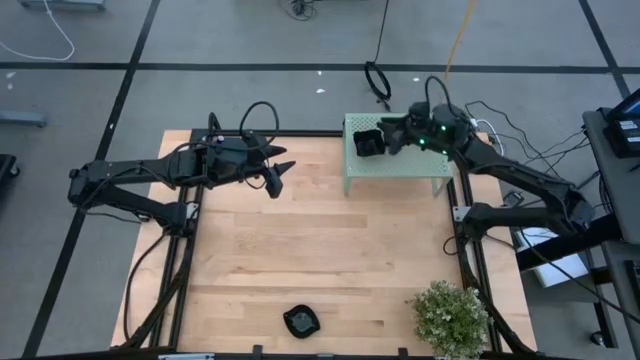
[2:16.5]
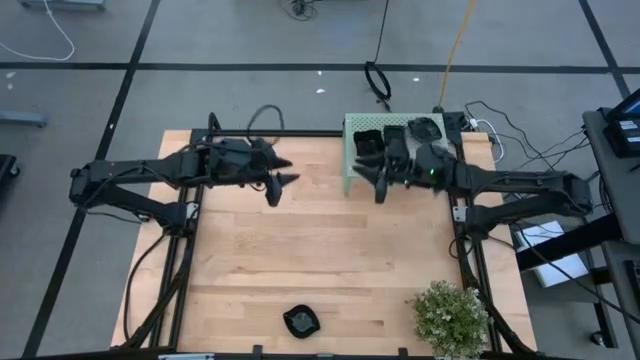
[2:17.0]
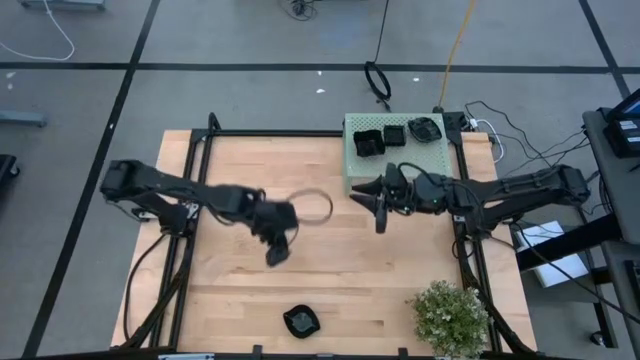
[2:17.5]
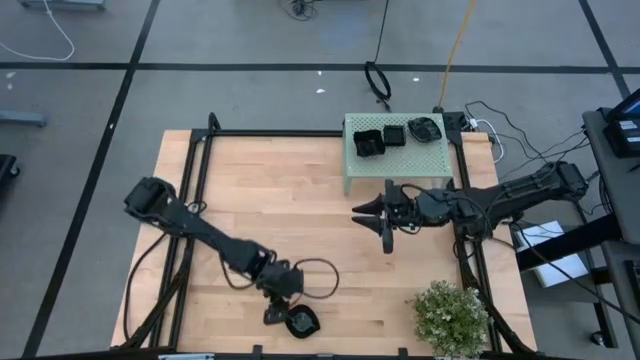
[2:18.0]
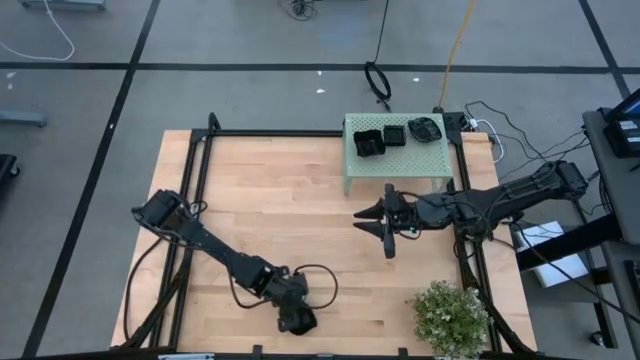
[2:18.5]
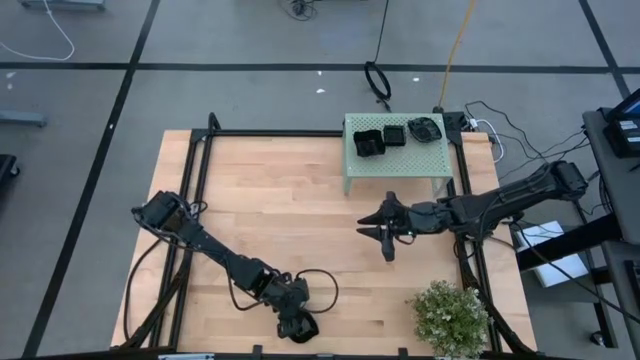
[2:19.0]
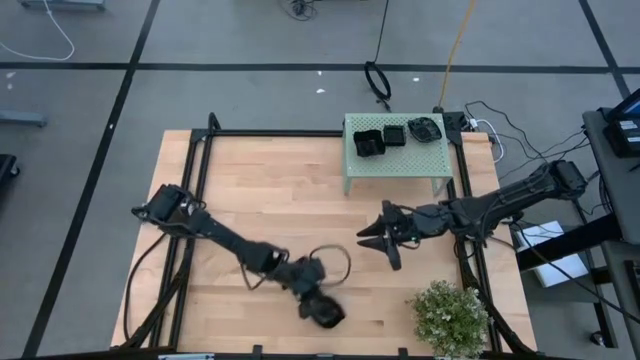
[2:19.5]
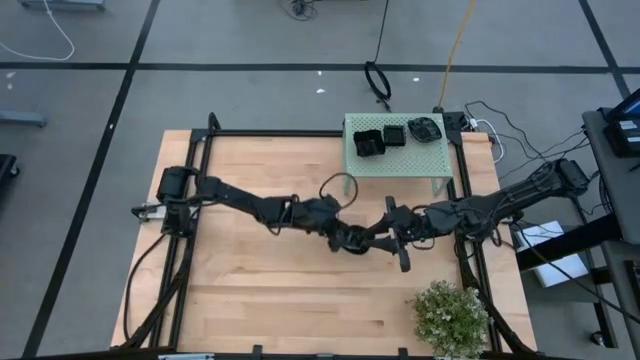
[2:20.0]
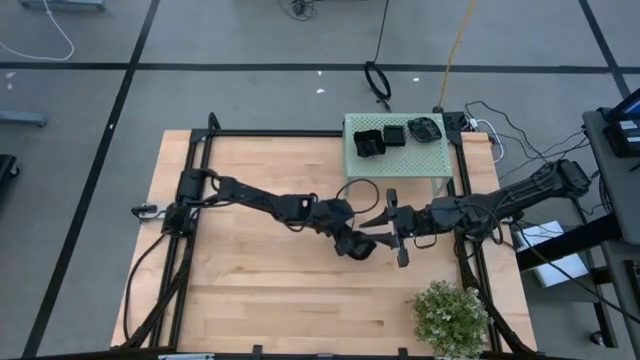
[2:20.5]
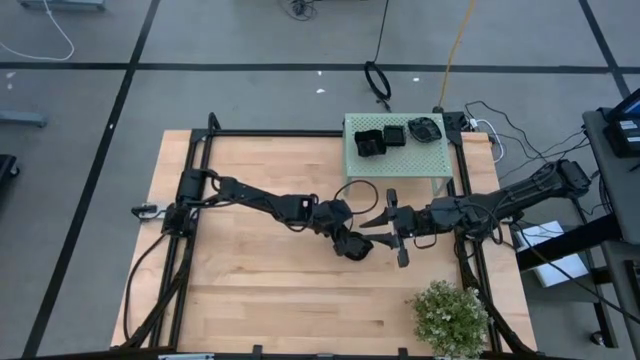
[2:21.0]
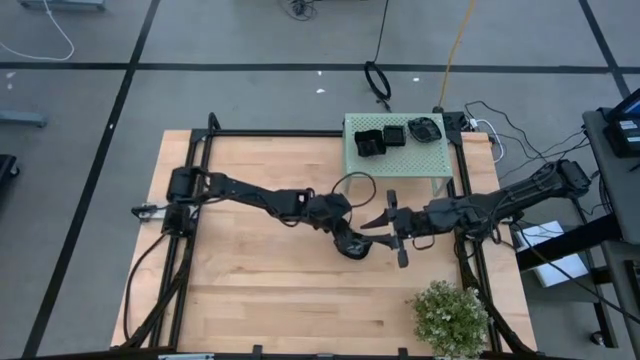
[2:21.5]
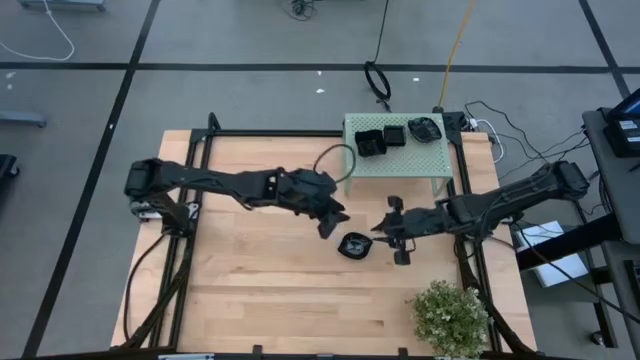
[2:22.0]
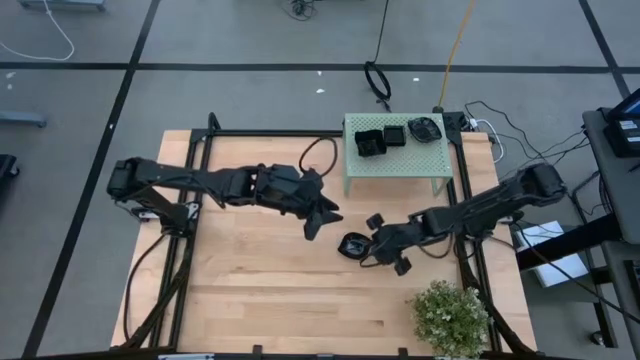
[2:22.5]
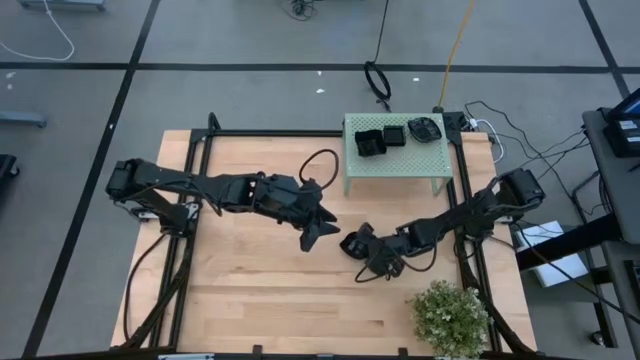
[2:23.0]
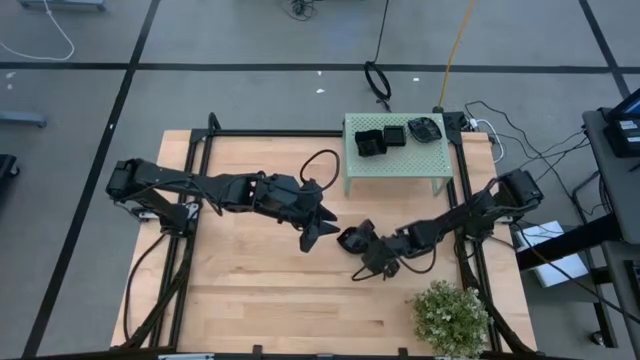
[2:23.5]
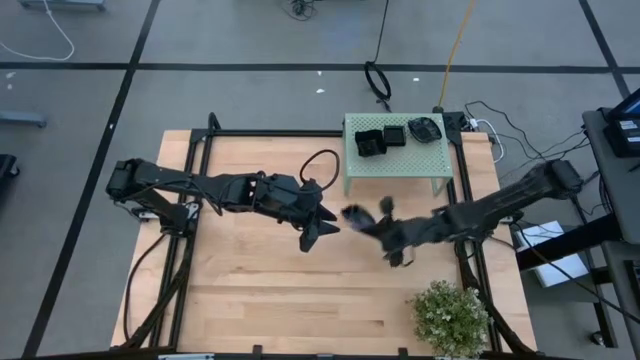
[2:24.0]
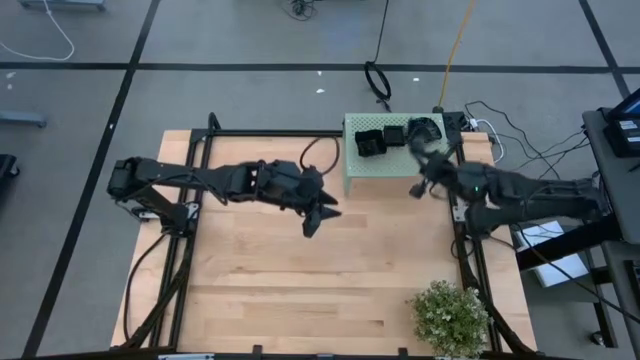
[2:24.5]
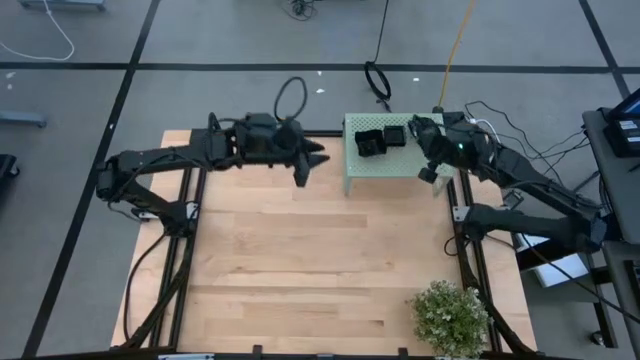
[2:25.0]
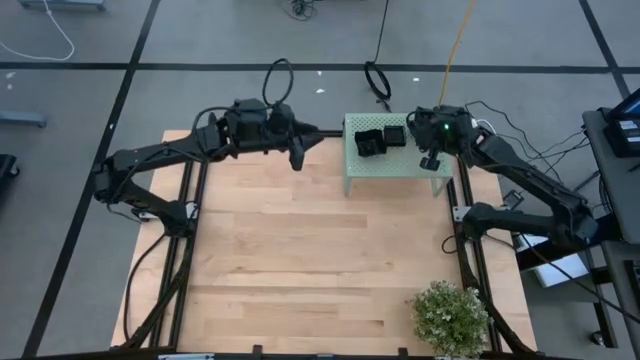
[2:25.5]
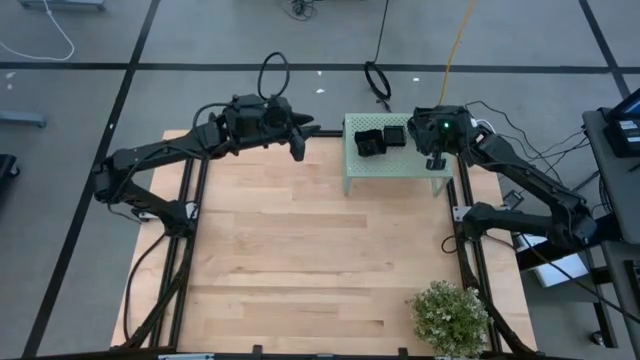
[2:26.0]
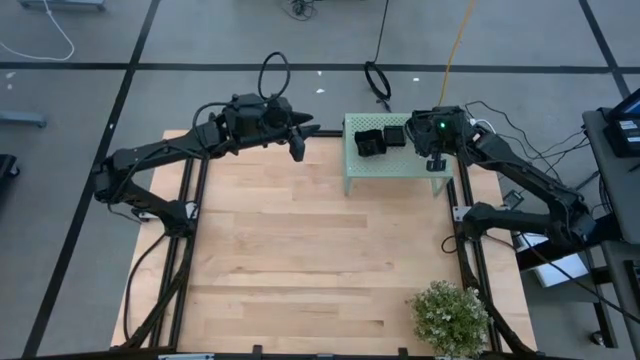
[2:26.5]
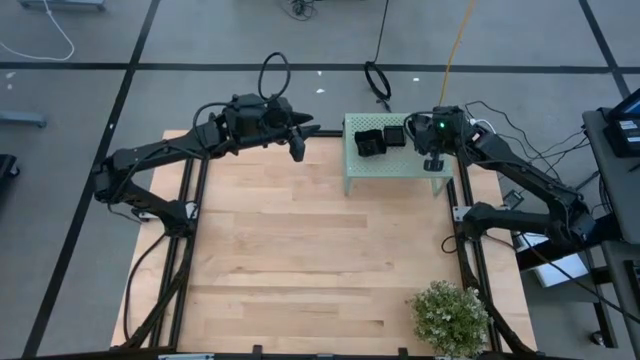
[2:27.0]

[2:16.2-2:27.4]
Task: Pick & Place Mini shaped plates
Stack the black leaf-shaped plate on top of the leaf-shaped plate on the shelf

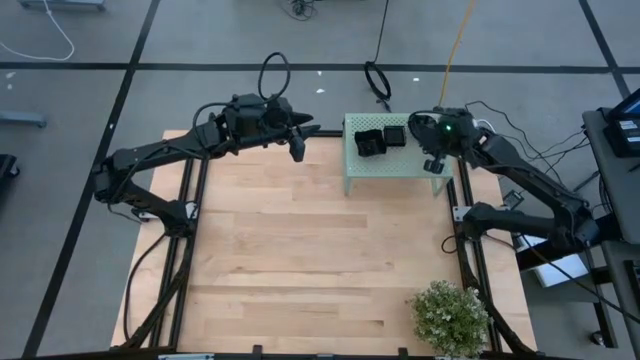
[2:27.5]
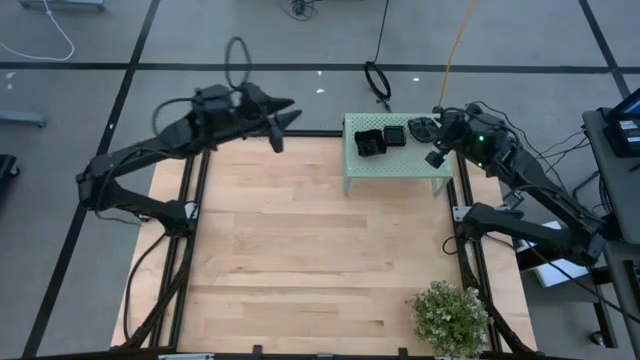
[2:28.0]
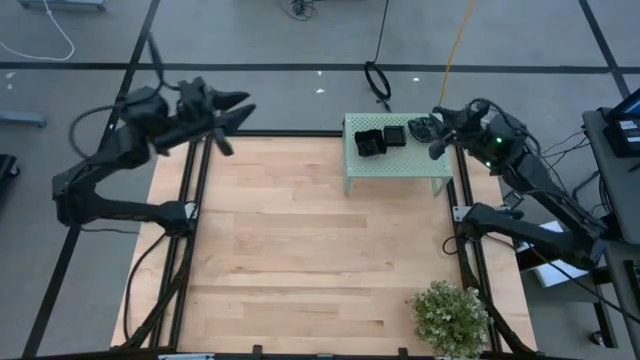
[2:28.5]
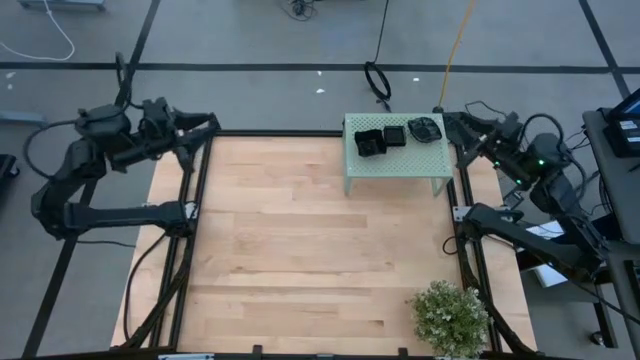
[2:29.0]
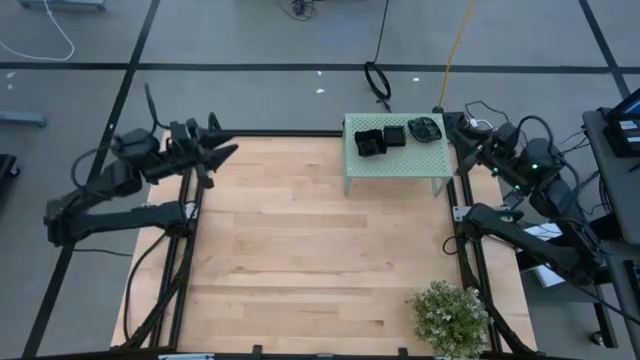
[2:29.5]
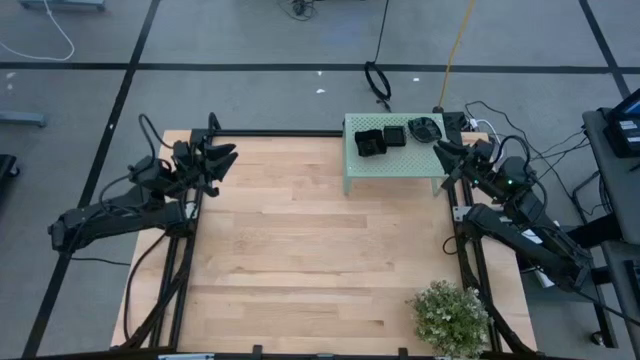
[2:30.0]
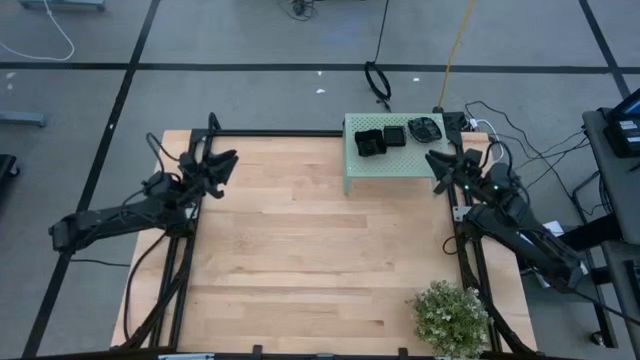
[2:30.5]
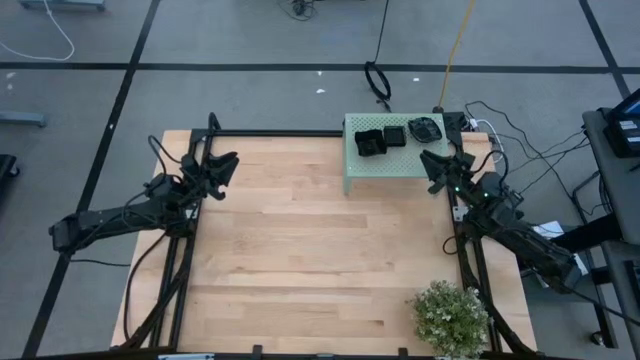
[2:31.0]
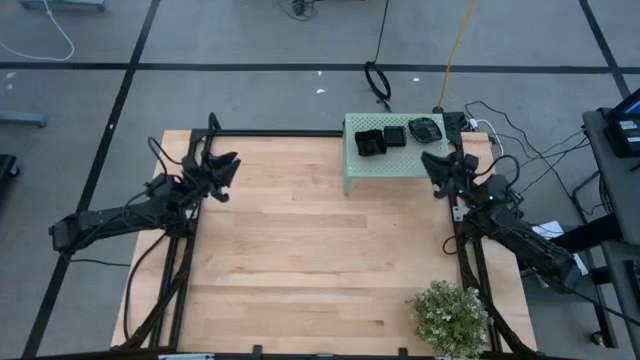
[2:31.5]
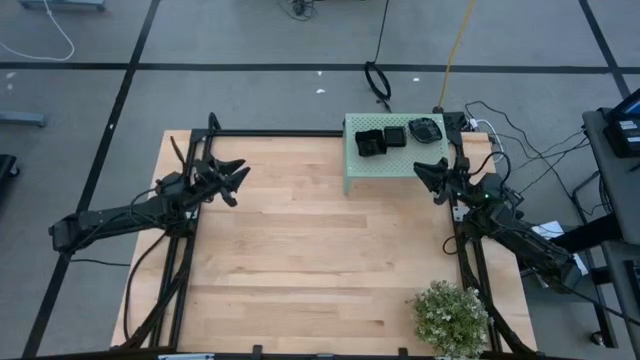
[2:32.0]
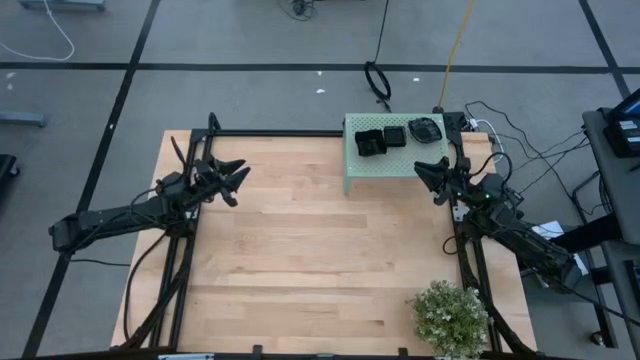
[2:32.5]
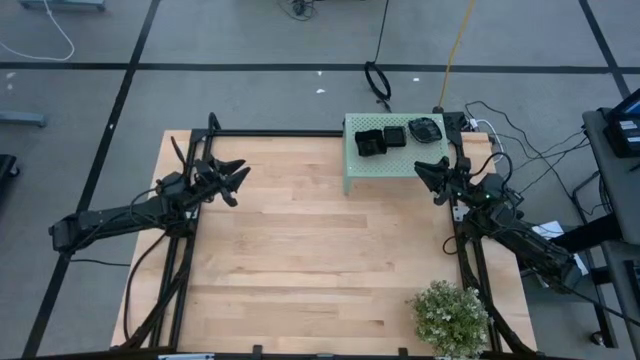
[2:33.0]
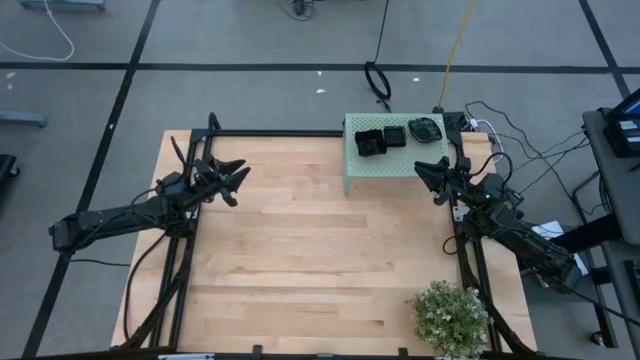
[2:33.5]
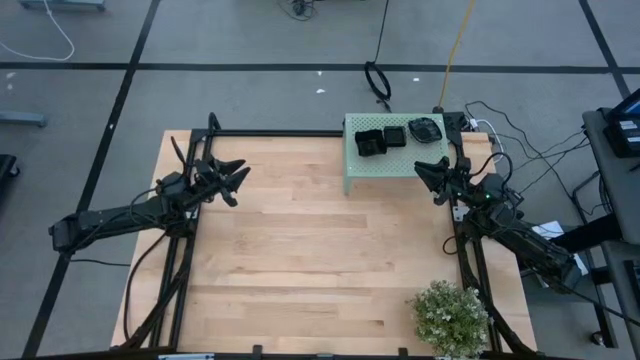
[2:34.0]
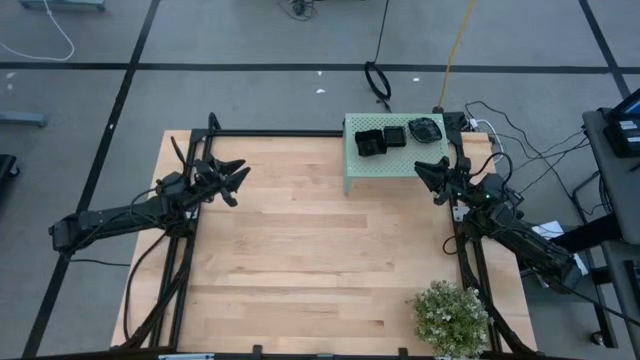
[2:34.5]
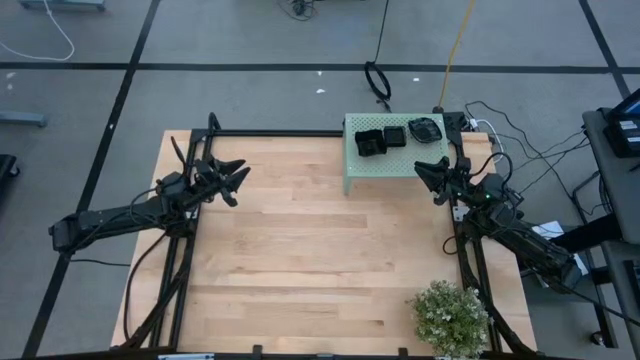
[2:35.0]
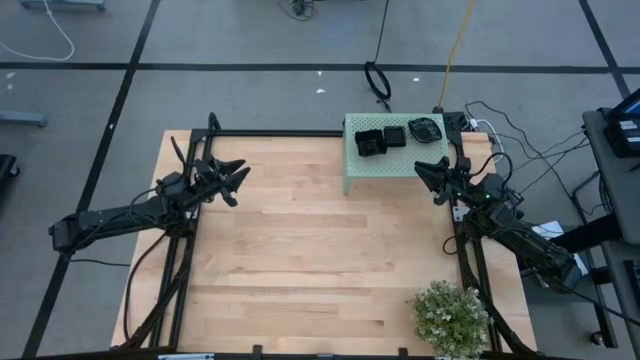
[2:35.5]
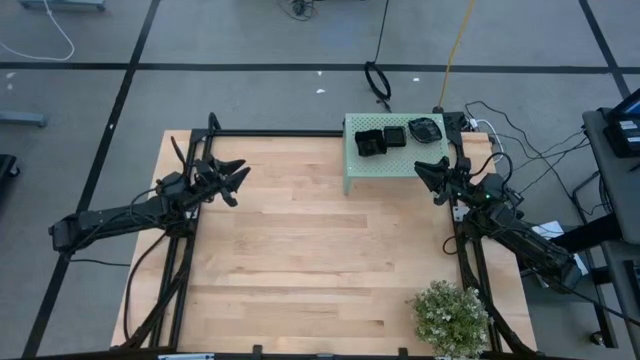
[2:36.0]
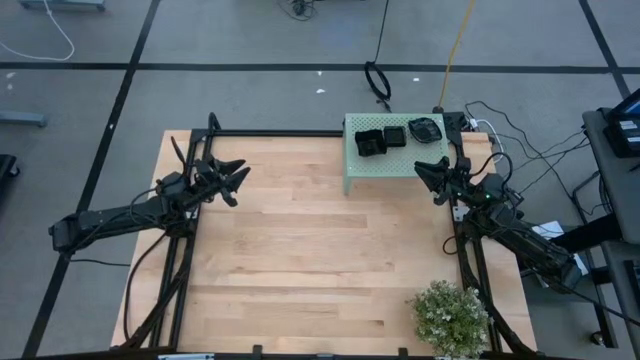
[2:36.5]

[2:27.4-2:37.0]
Return to Home Position

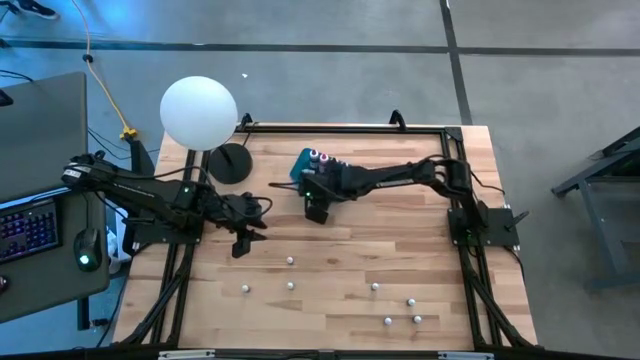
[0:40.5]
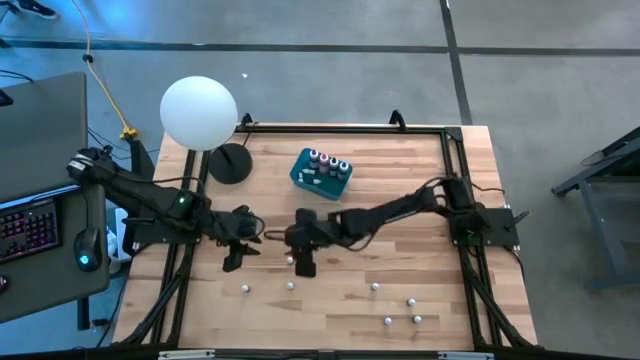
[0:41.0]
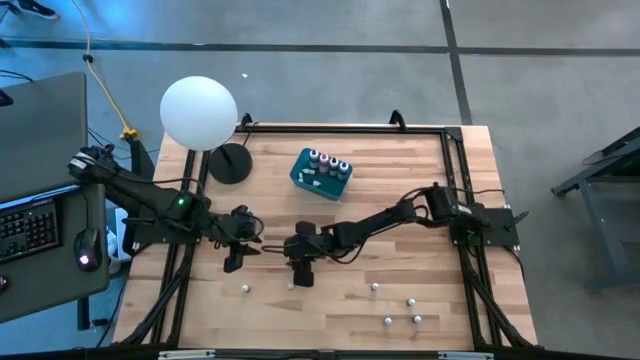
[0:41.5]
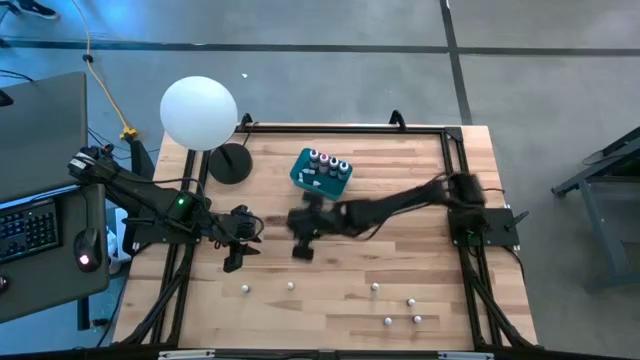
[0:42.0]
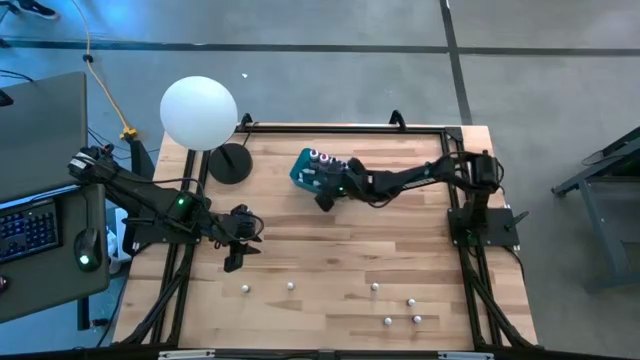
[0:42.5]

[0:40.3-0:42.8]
Task: Pick & Place food coloring
Put the brown food coloring bottle into the blue bin
